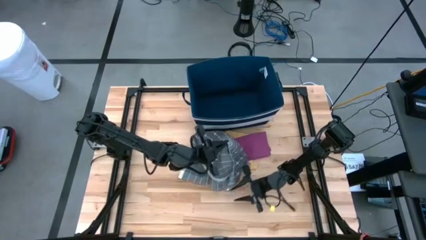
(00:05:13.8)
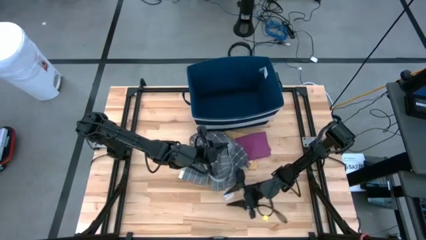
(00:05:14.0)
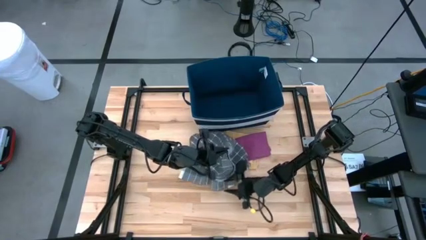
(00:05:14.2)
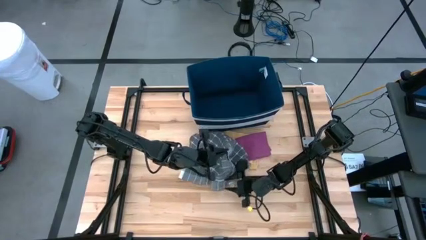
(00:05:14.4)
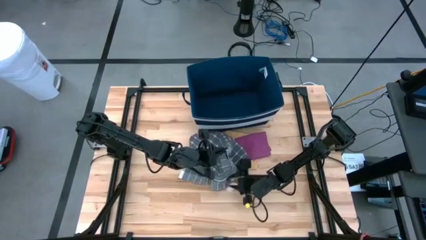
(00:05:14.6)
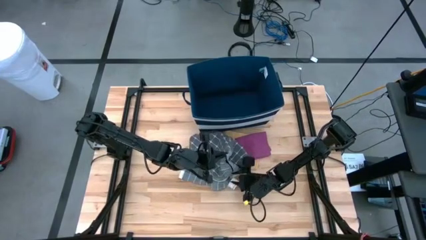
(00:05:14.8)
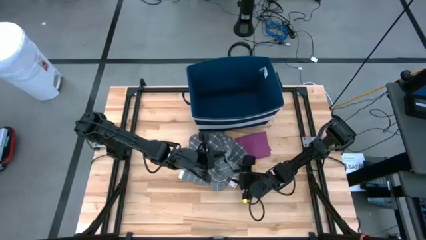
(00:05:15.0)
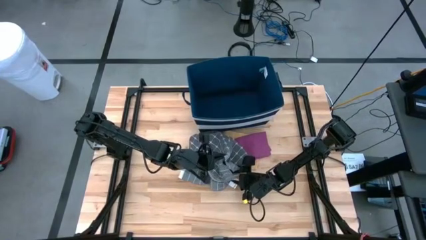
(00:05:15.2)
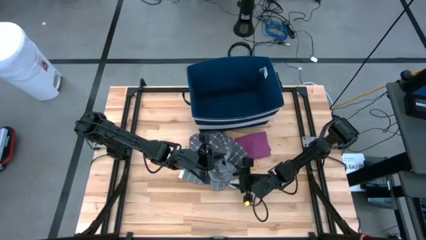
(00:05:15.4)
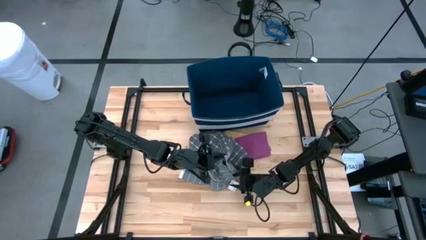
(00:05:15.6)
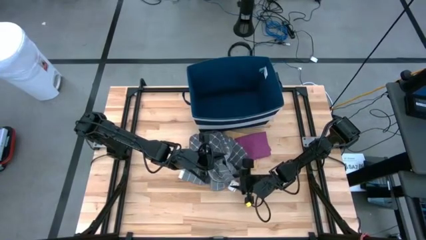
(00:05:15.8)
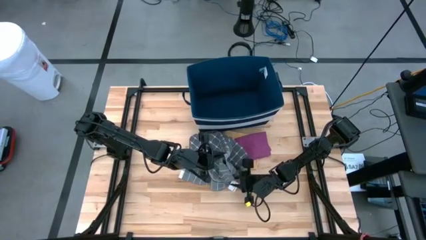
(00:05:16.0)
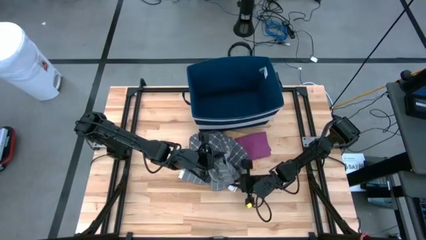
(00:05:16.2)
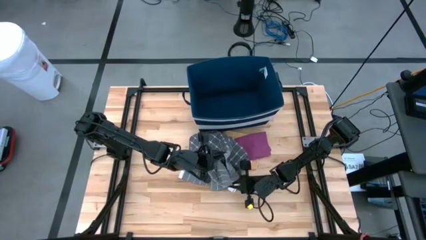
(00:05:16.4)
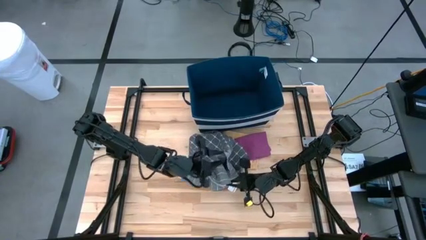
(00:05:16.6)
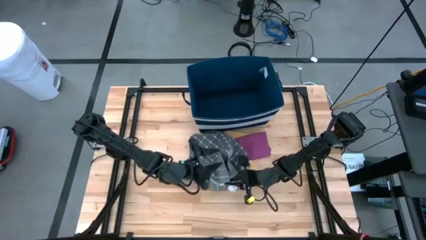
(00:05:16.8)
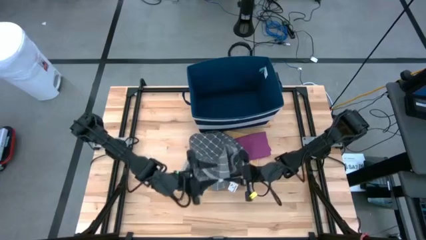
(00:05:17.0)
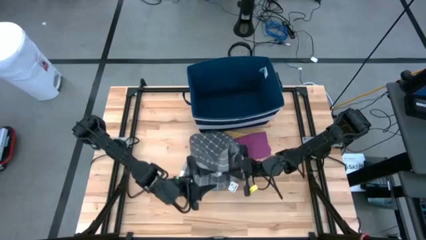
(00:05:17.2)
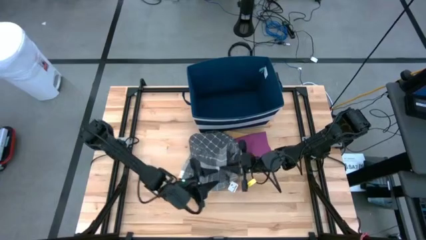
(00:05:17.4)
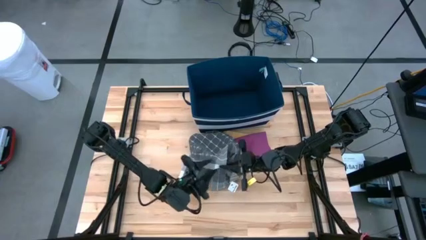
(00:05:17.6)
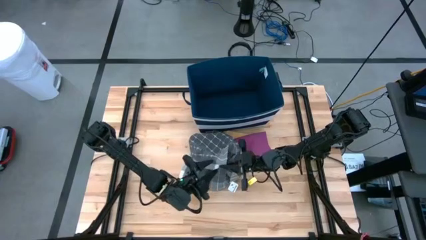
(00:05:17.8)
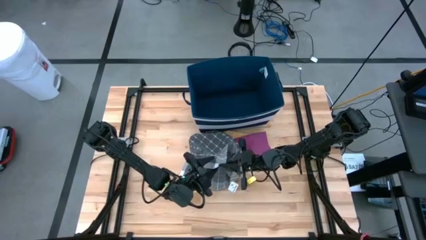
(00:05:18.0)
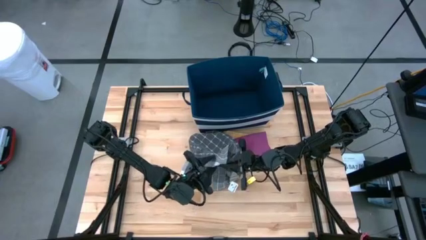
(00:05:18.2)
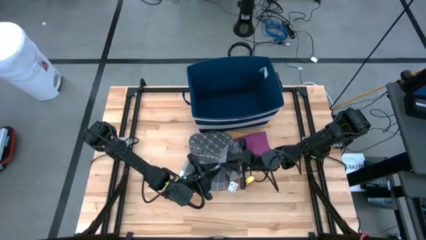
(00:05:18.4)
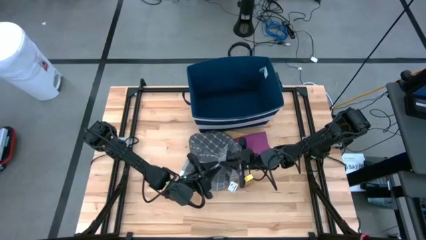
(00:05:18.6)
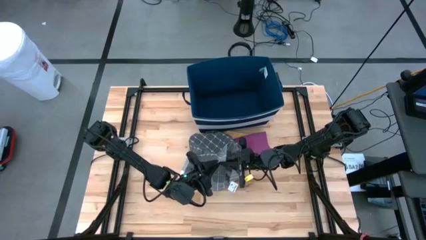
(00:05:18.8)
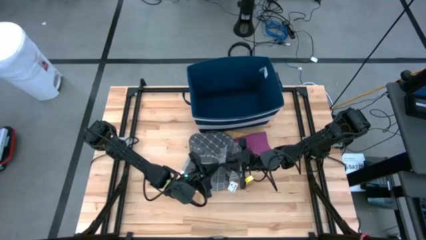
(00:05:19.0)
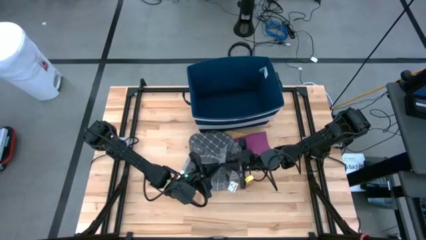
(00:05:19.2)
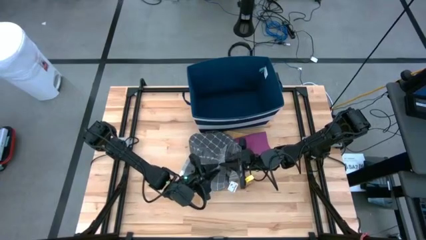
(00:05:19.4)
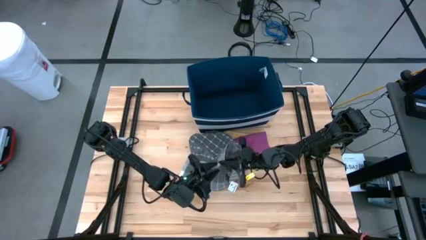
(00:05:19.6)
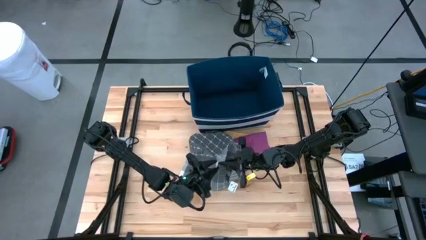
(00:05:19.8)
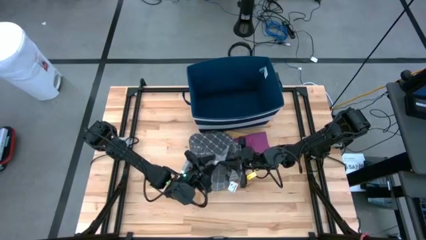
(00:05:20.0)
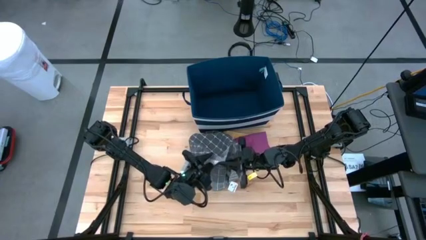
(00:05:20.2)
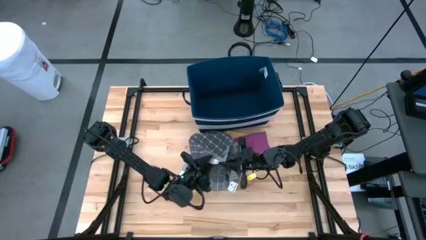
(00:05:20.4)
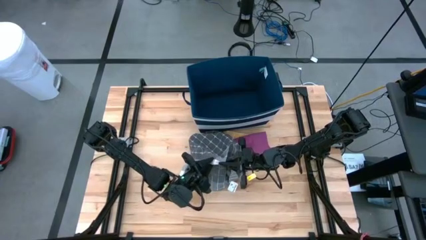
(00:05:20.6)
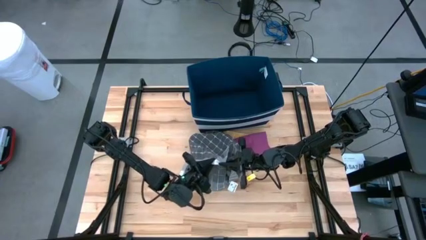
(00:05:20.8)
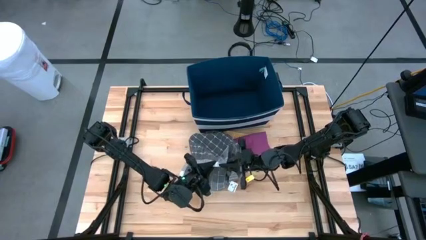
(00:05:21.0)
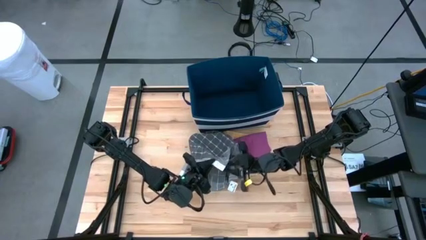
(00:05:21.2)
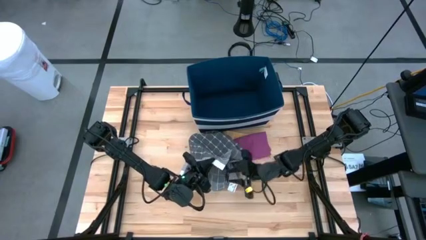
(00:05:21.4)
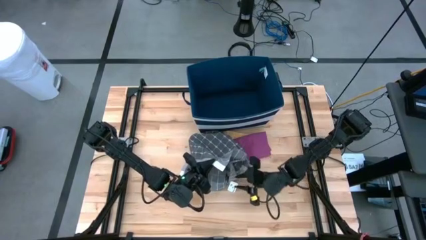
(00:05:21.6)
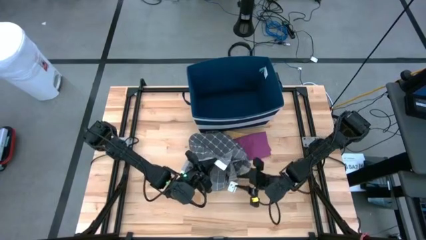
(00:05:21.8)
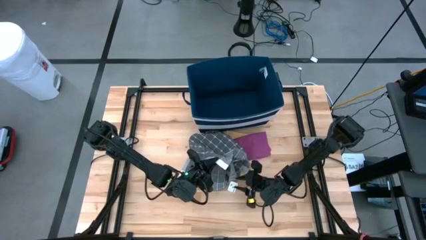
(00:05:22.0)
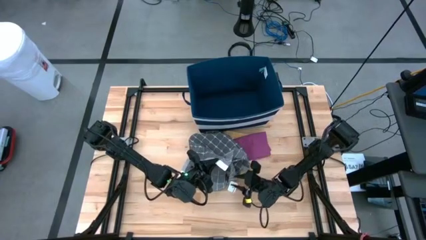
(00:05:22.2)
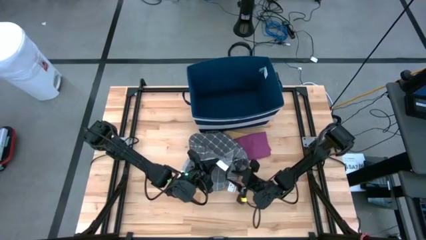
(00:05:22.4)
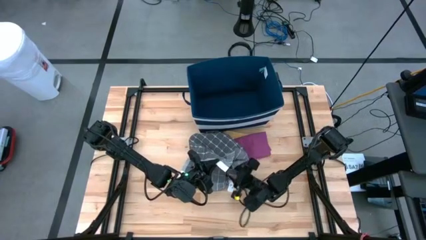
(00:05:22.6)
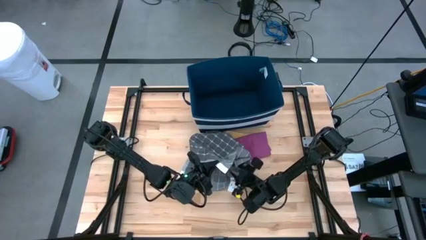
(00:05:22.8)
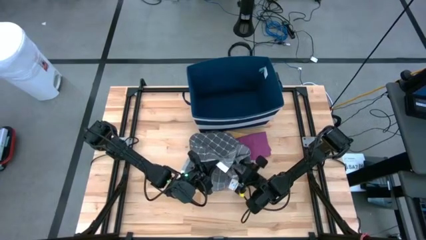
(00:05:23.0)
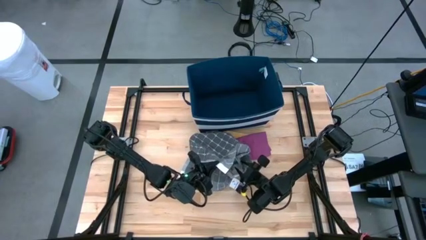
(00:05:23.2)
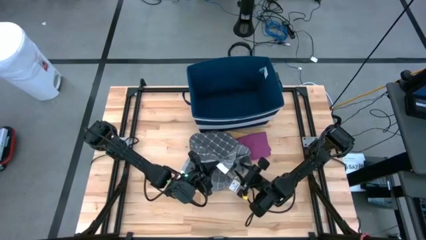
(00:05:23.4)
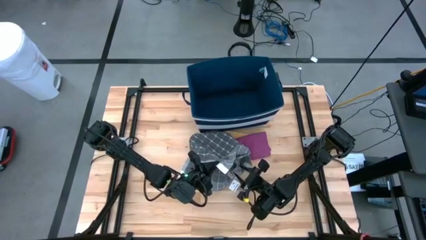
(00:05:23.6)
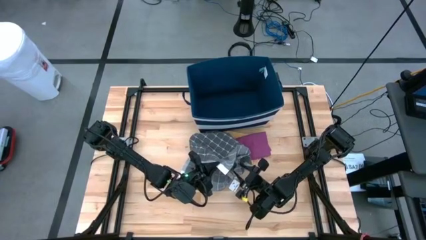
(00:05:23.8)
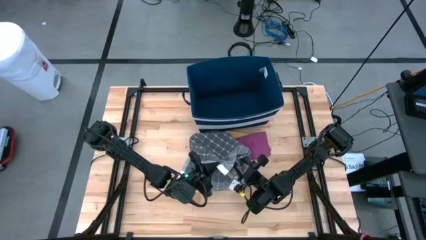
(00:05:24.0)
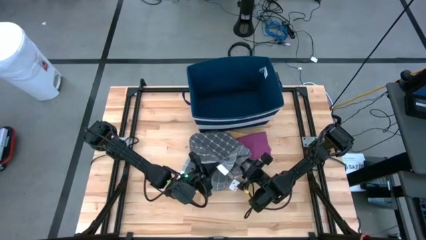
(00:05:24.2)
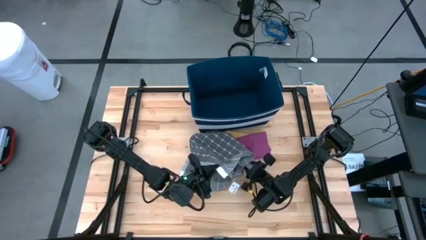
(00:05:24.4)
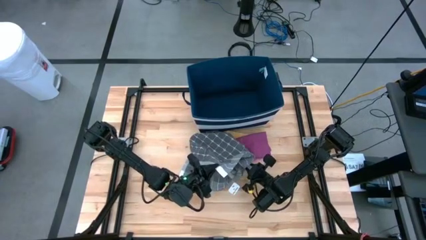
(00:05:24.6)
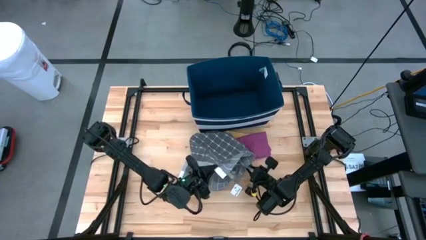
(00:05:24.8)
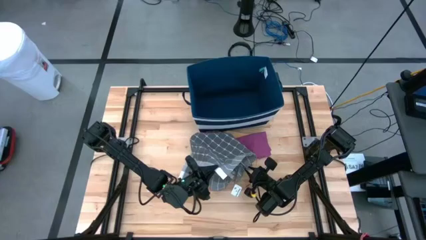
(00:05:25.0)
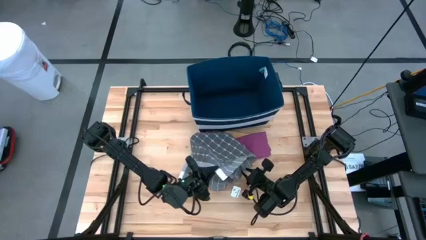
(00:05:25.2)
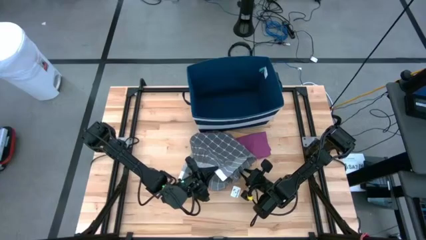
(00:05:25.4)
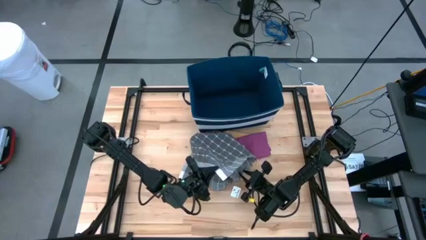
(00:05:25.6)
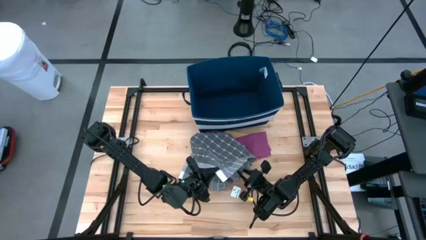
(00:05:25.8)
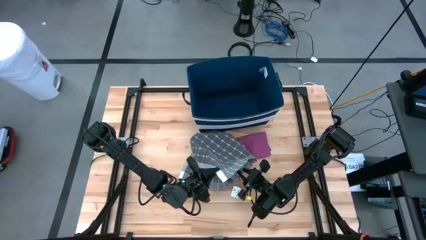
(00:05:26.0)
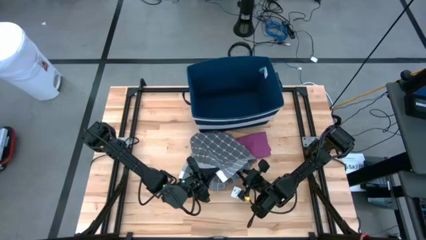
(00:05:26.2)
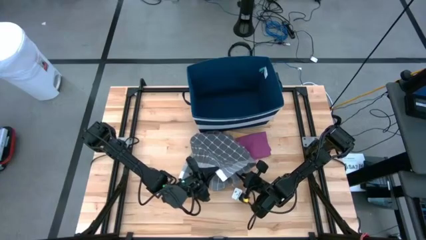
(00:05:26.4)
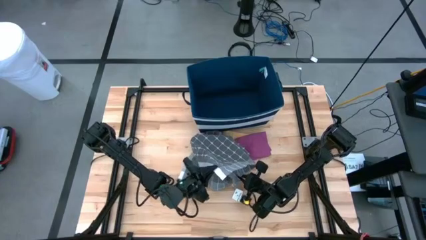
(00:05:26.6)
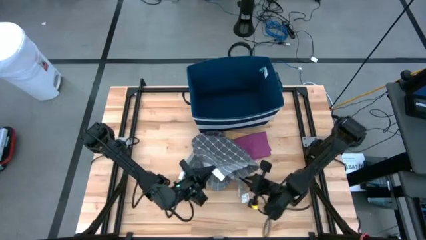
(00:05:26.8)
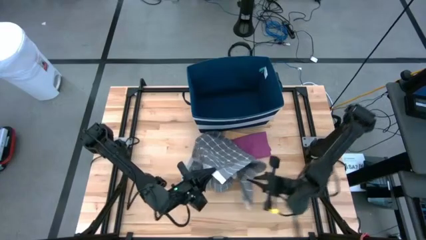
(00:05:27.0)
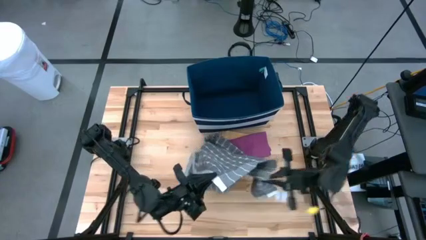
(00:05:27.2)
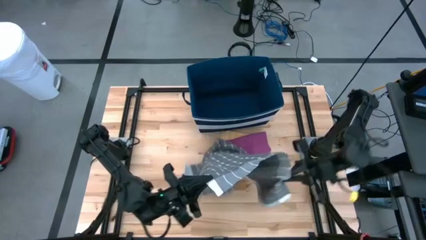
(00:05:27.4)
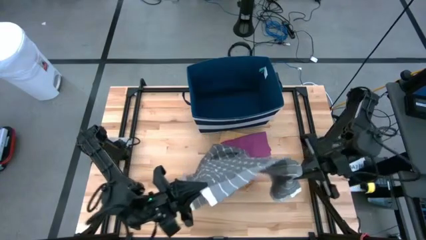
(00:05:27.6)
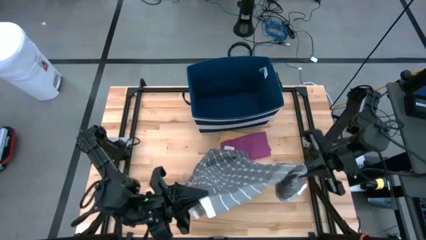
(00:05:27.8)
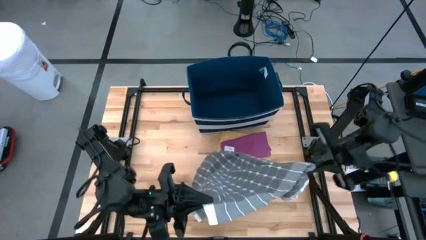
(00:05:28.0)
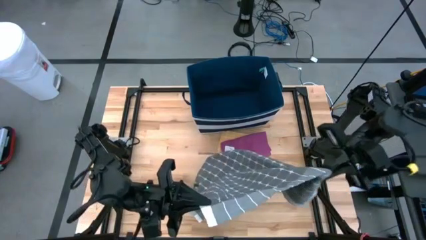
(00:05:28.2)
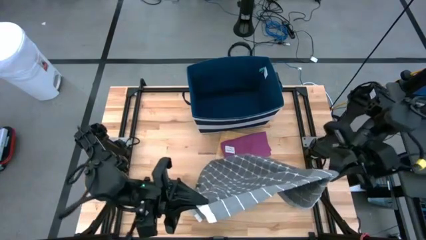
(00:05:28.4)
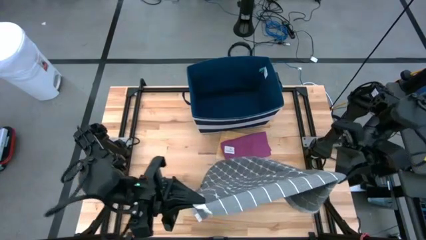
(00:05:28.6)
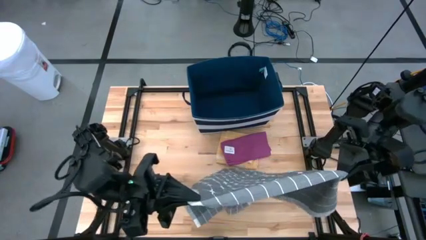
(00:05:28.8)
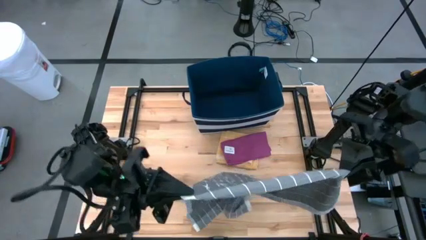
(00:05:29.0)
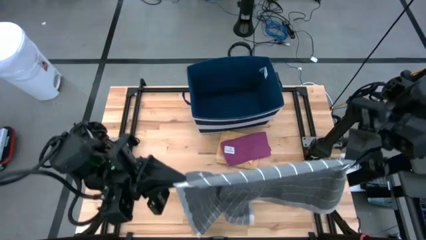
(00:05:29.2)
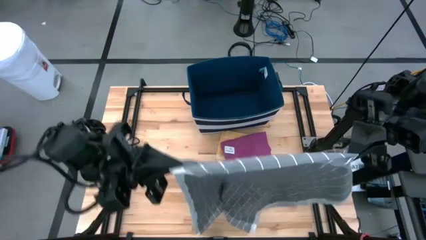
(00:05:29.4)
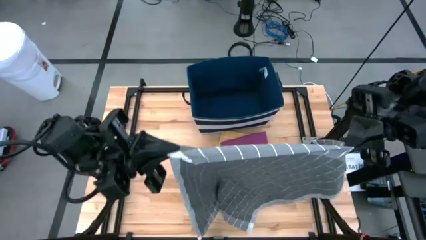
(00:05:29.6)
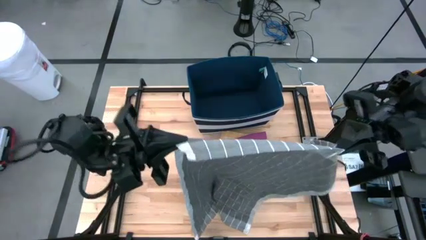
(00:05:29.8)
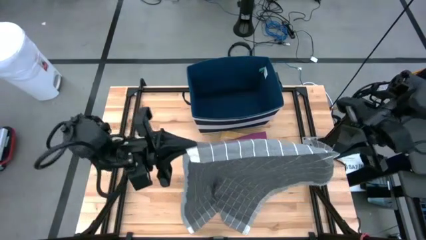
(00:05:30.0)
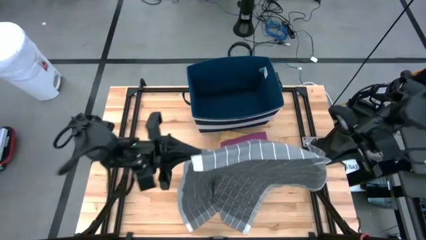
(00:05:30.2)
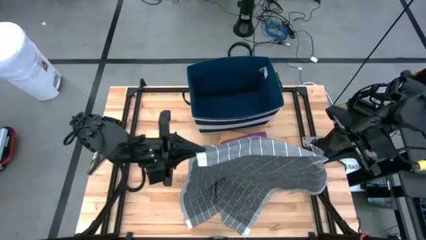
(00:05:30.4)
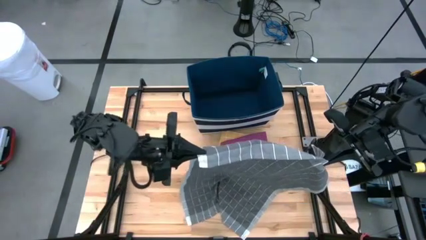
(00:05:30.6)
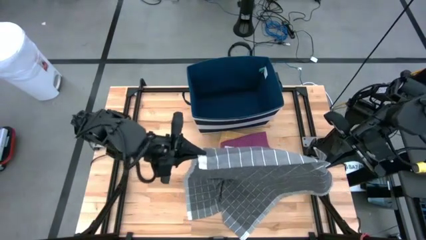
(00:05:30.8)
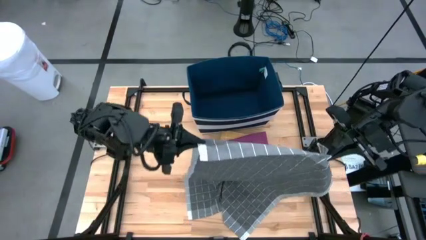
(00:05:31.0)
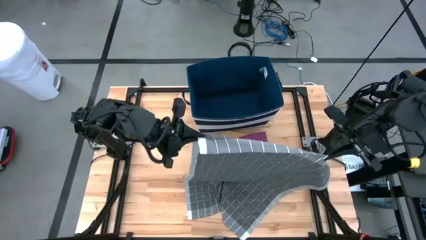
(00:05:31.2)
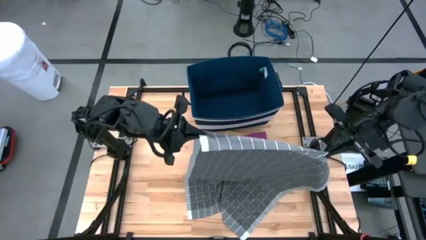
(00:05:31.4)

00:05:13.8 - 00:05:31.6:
Task: Fold towel
Fold the gray towel
